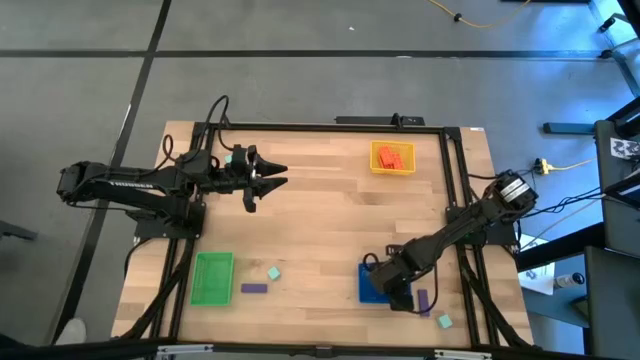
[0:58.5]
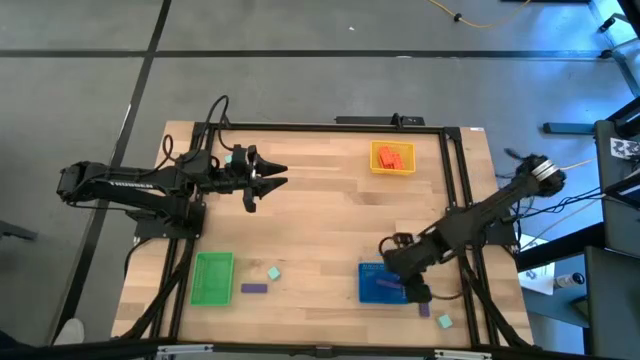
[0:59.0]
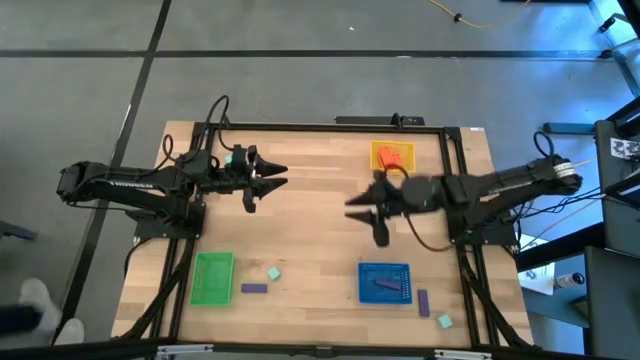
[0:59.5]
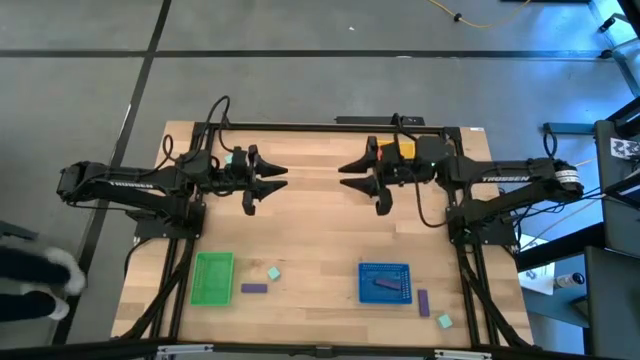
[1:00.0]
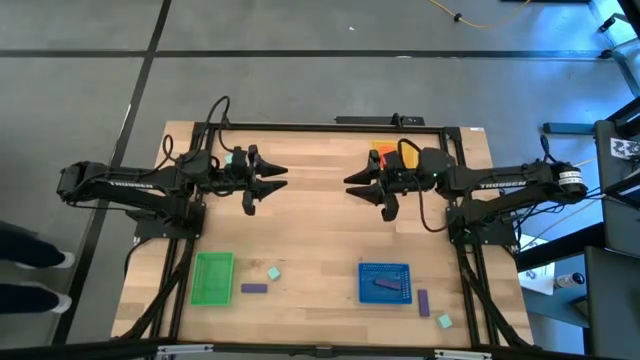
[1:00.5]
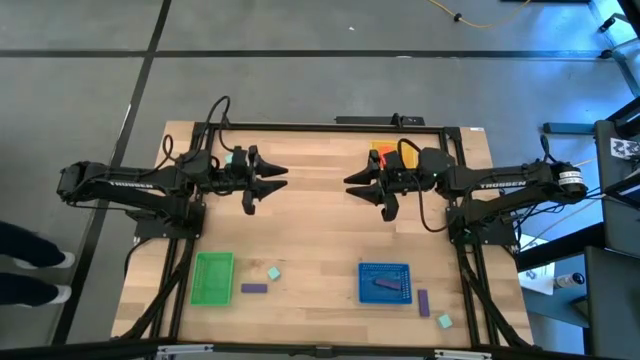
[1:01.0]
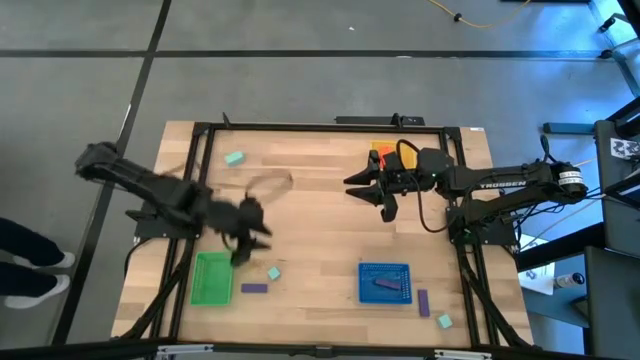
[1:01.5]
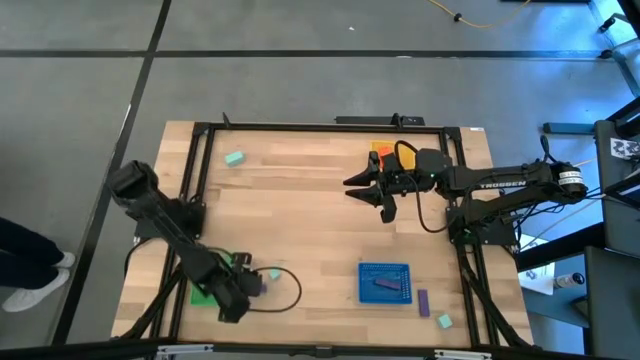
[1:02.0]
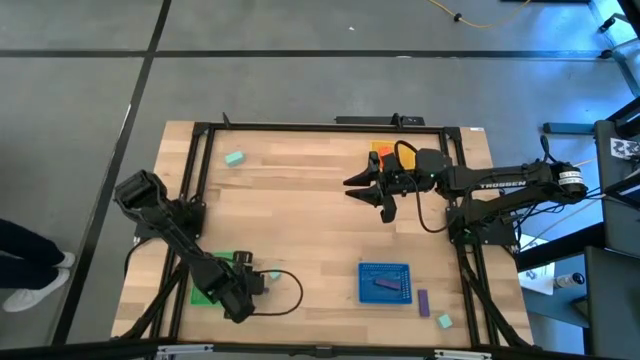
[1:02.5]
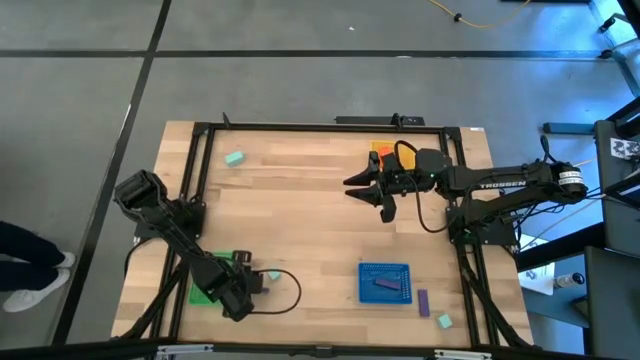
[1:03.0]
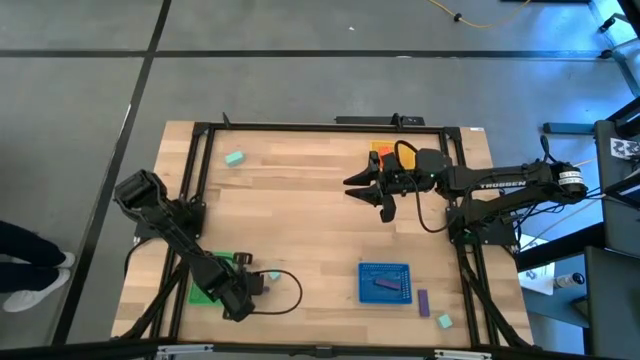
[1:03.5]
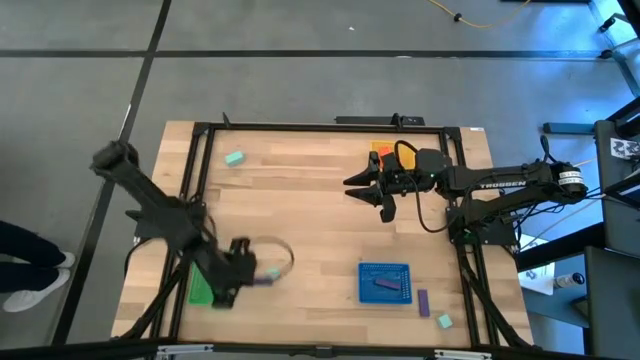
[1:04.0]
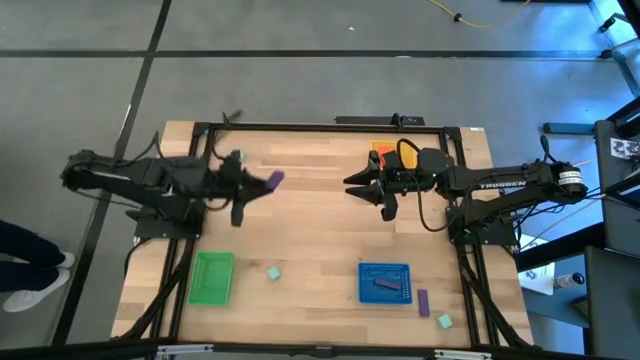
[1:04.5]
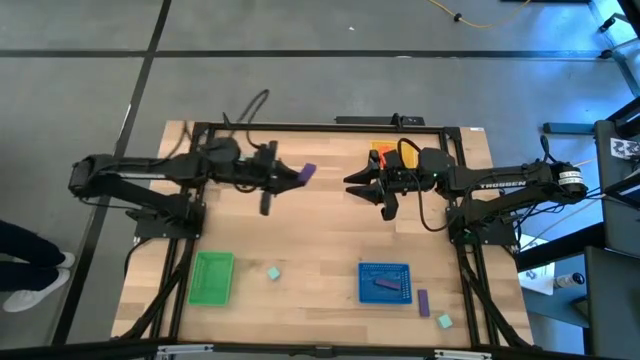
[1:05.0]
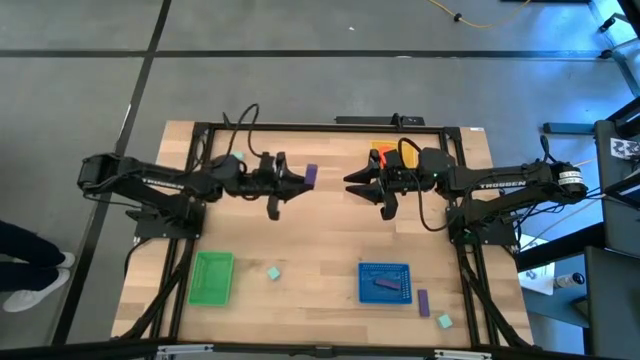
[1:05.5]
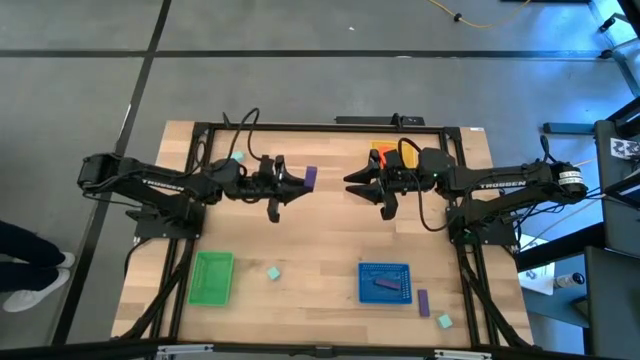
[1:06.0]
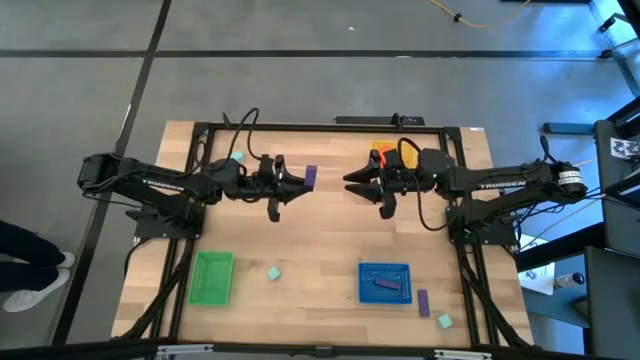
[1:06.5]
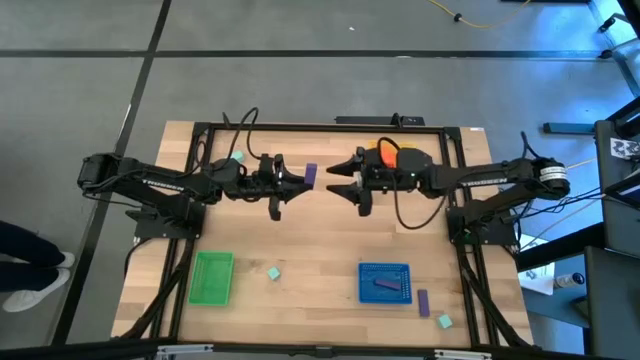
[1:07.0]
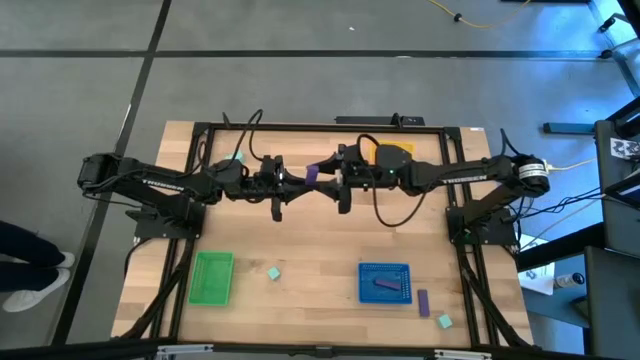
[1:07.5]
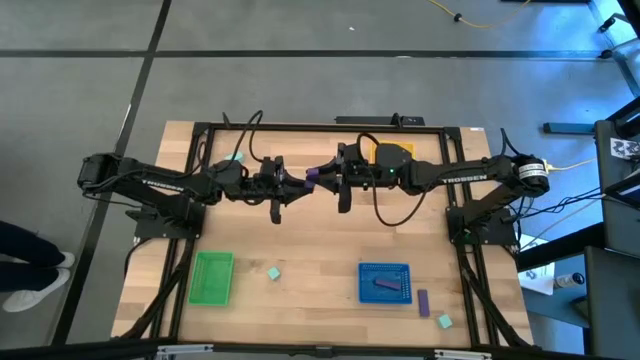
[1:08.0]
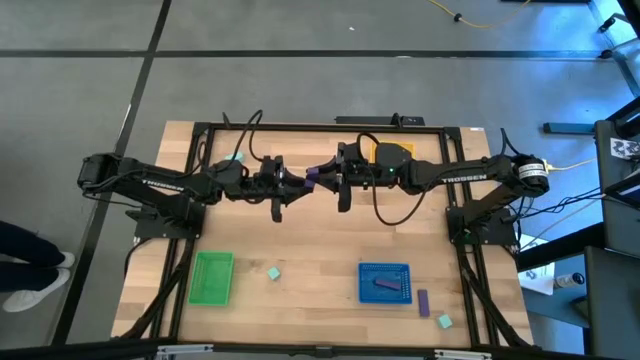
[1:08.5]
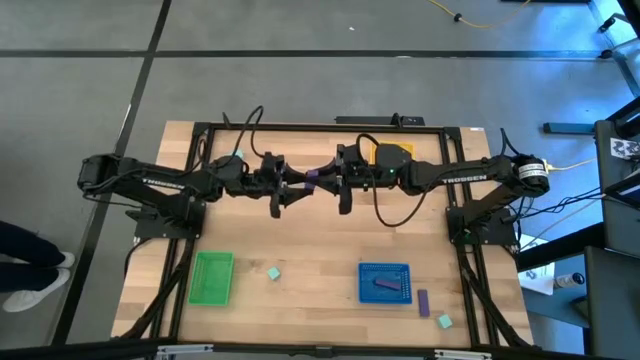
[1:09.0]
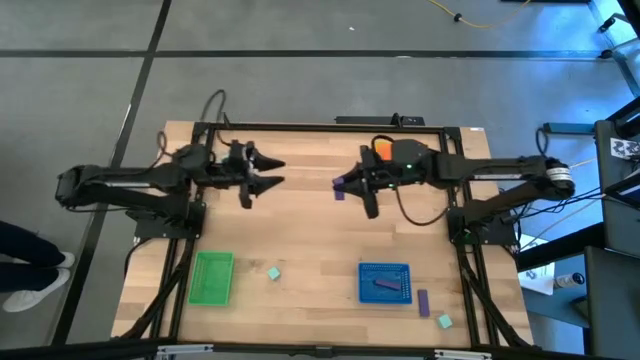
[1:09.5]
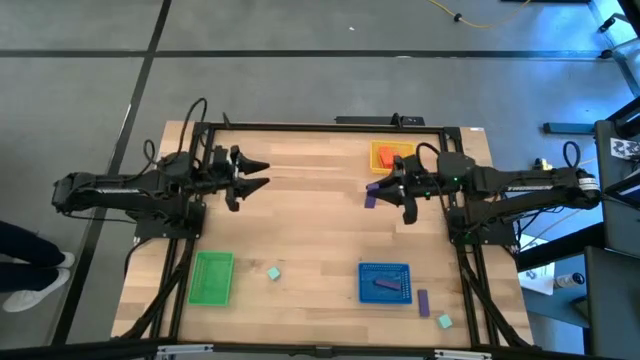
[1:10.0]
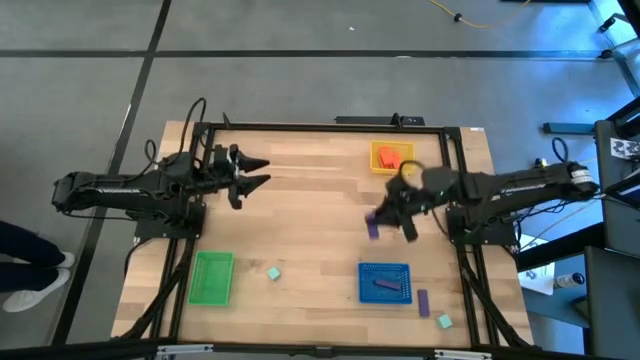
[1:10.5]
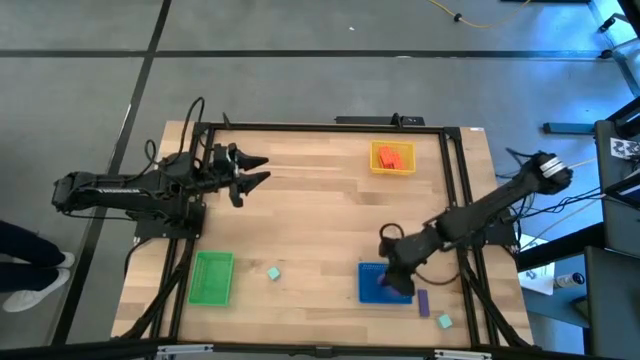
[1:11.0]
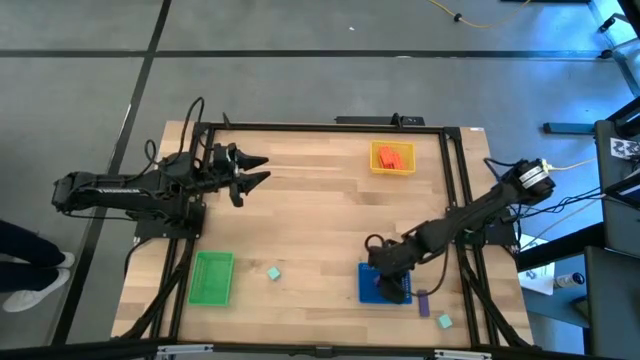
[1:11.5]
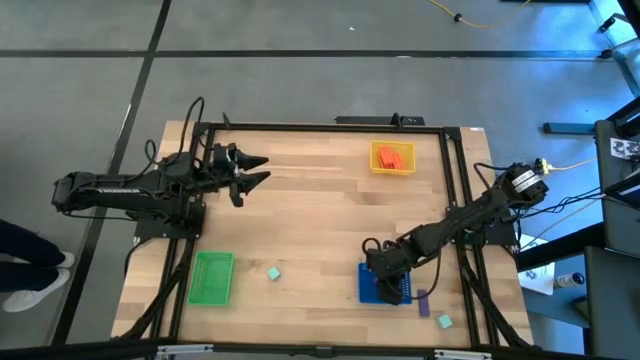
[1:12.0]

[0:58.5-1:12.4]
Task: Sort & place blocks by color
Put the left purple block into the blue bin

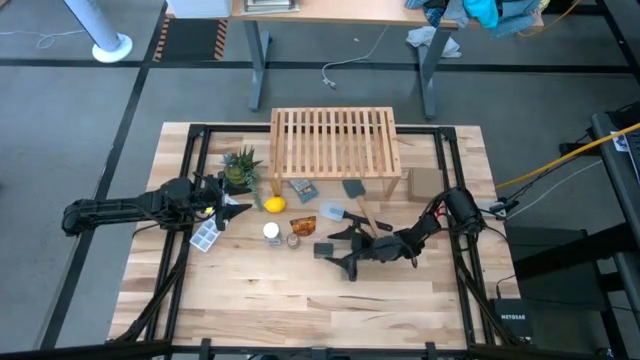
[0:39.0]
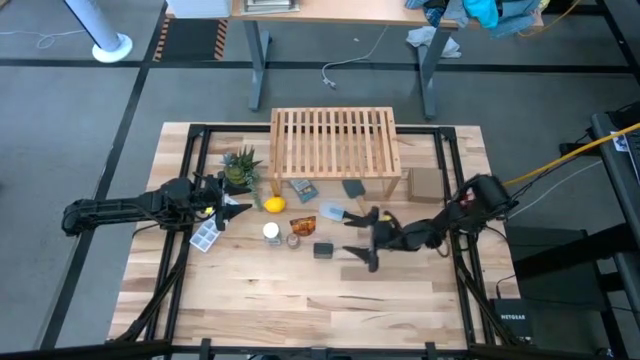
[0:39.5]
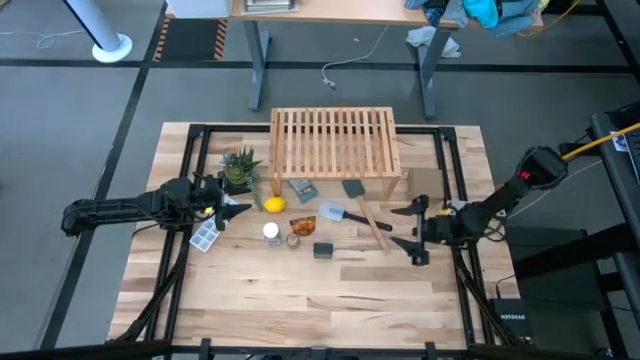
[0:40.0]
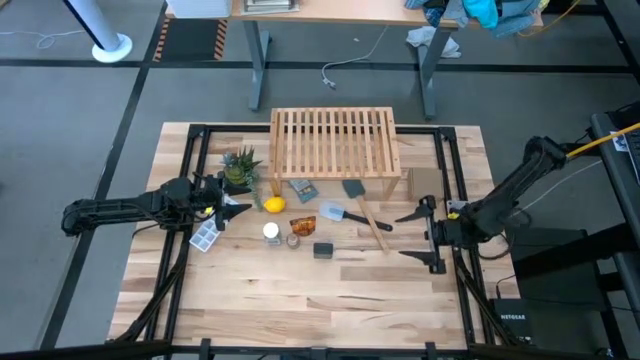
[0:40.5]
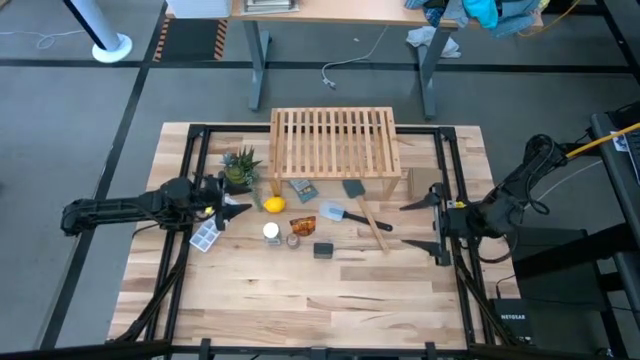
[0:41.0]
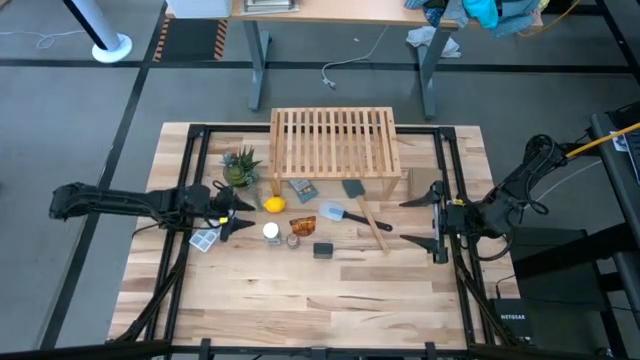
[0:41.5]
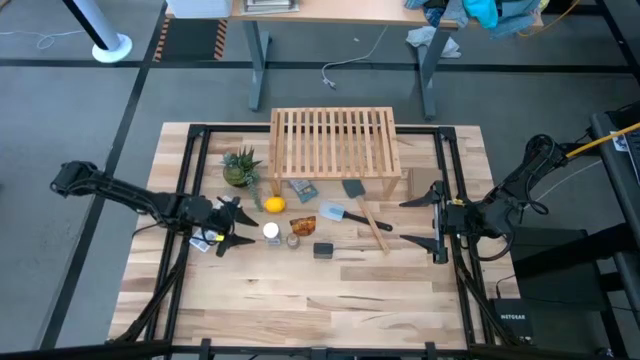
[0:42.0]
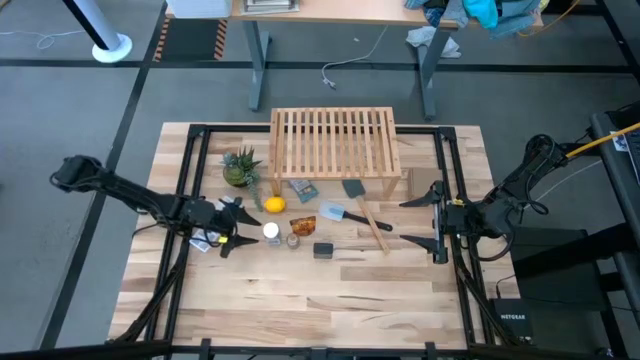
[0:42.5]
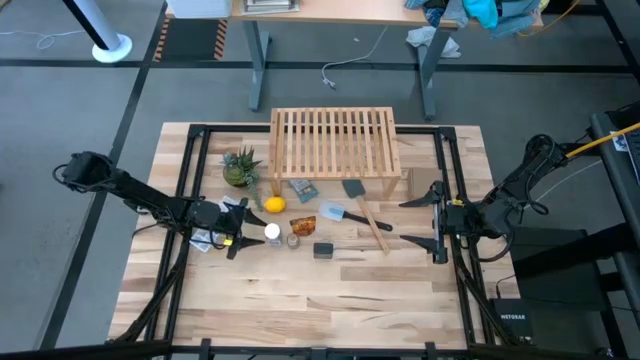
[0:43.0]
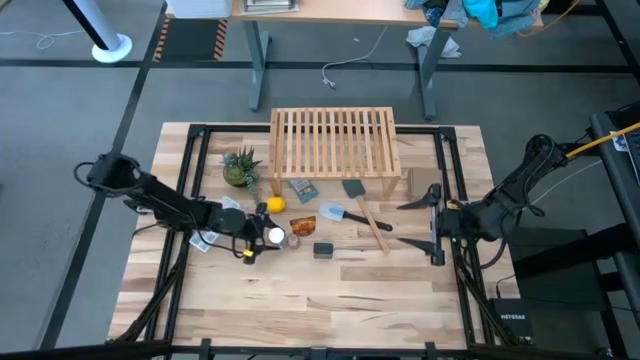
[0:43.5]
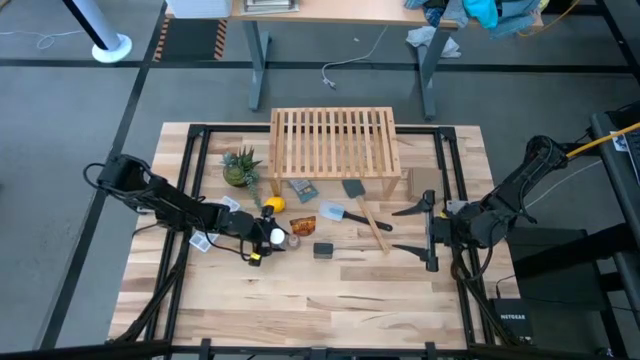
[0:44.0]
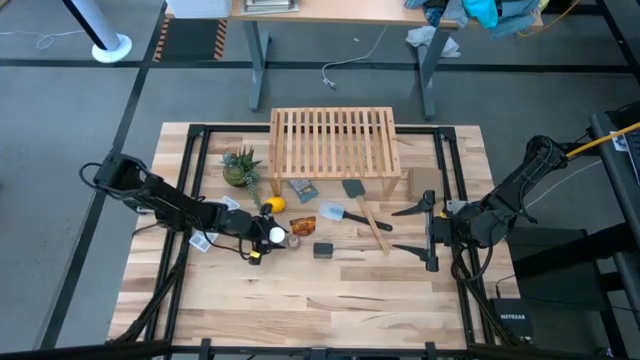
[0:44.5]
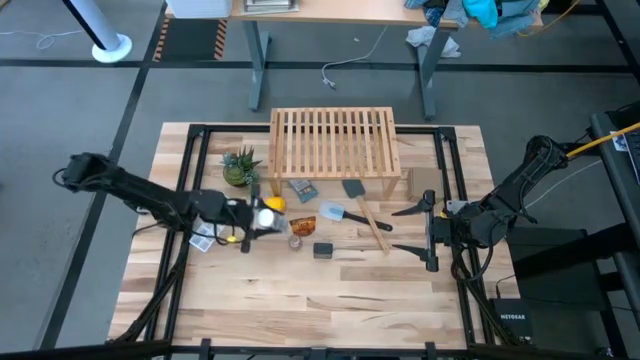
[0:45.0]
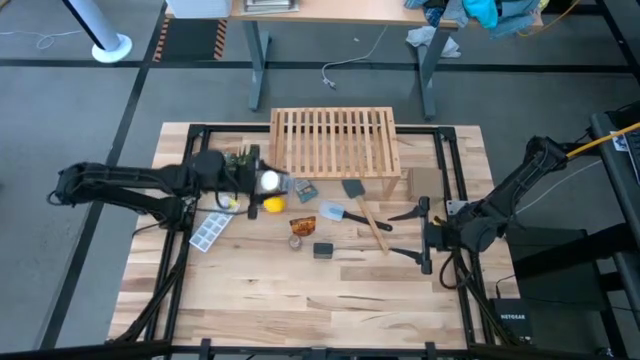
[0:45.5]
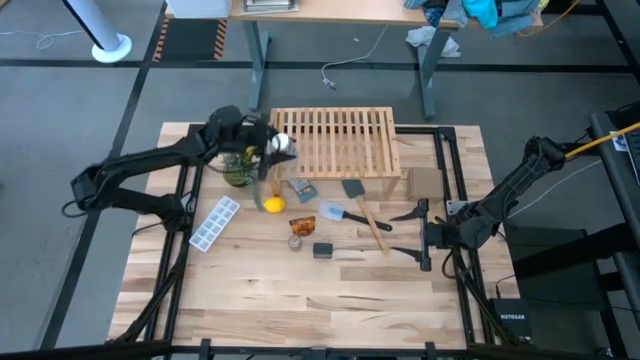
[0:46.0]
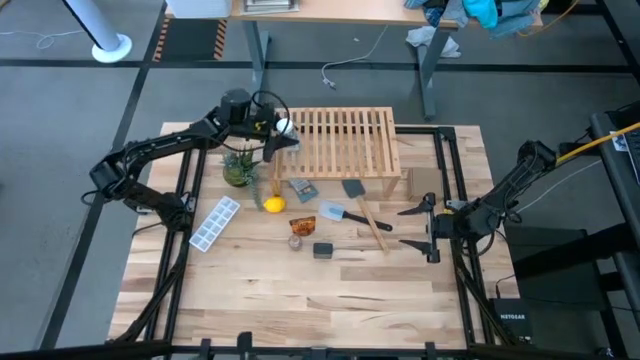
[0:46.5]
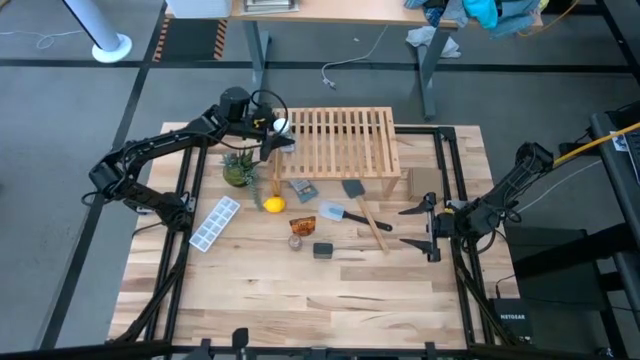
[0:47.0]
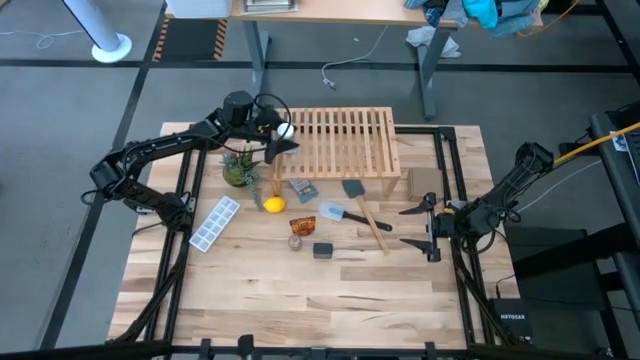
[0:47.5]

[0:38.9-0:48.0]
Task: Shelf spices
Put the white seasoning bottle on the shelf
